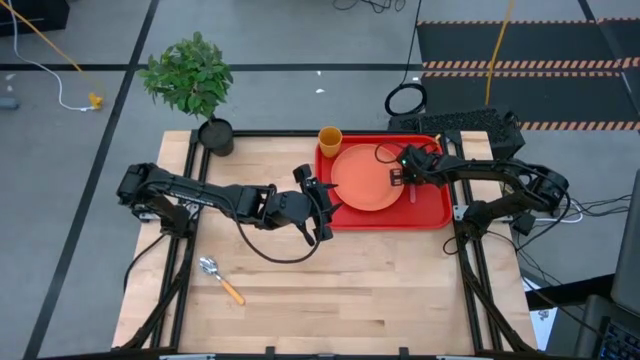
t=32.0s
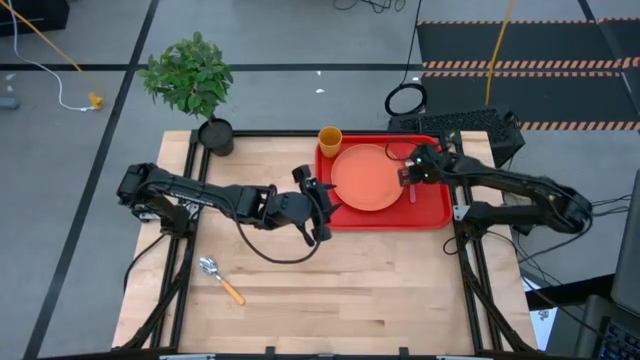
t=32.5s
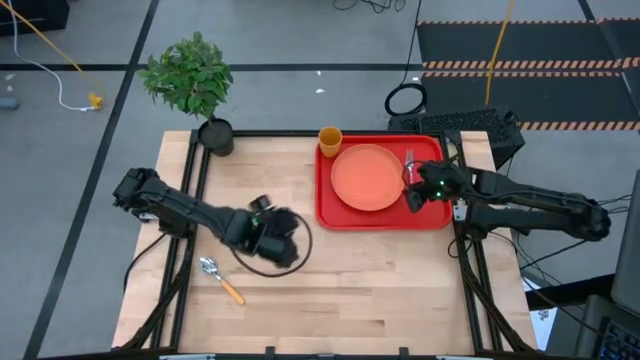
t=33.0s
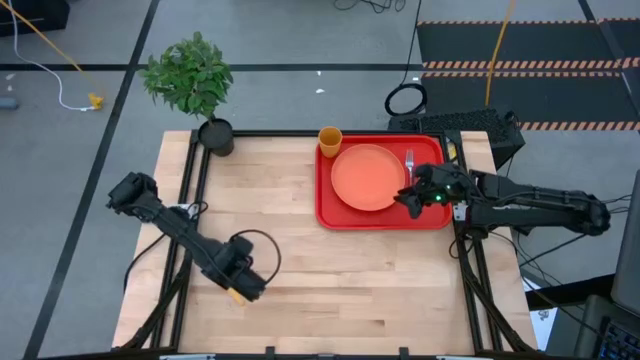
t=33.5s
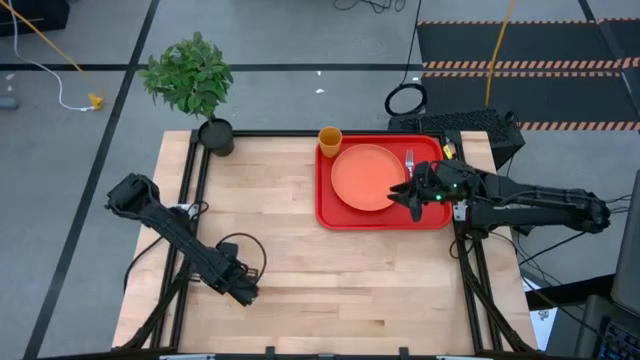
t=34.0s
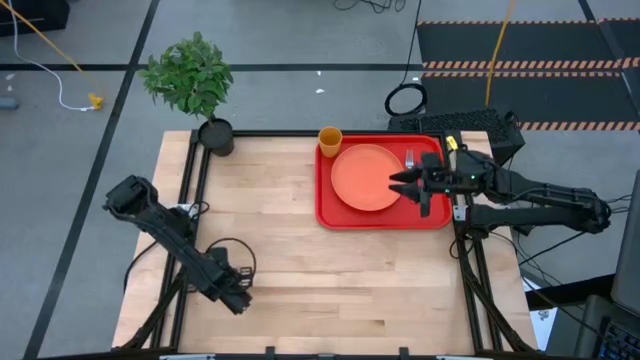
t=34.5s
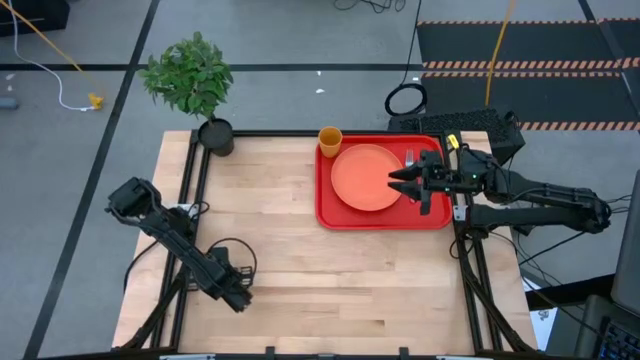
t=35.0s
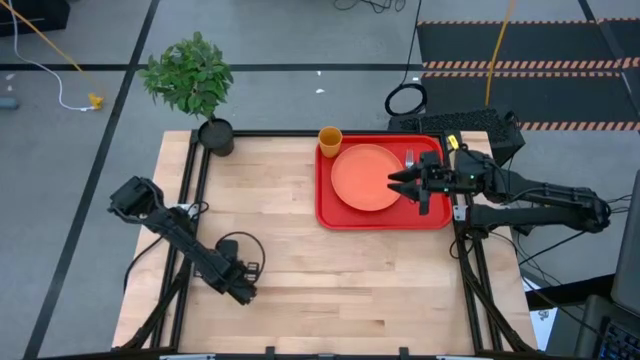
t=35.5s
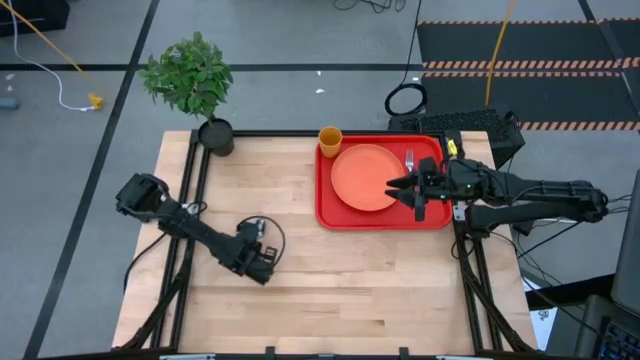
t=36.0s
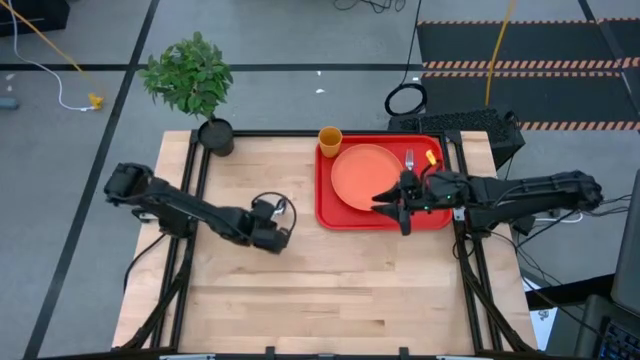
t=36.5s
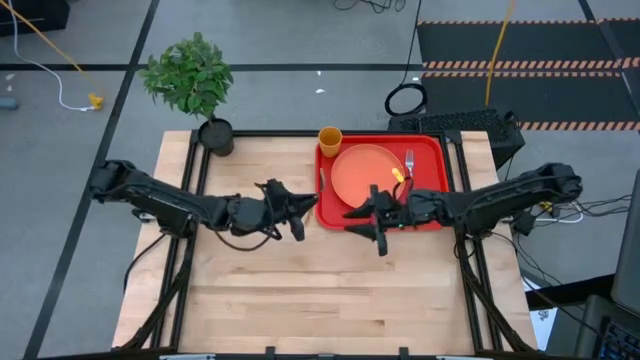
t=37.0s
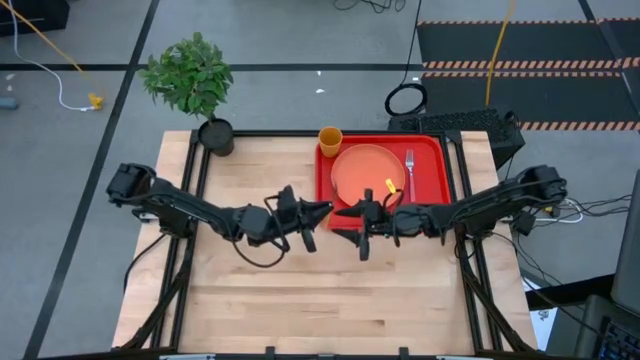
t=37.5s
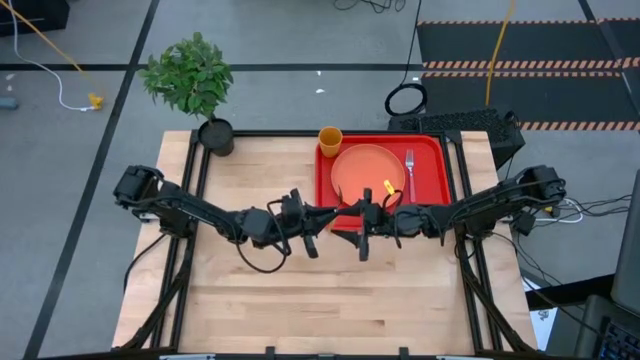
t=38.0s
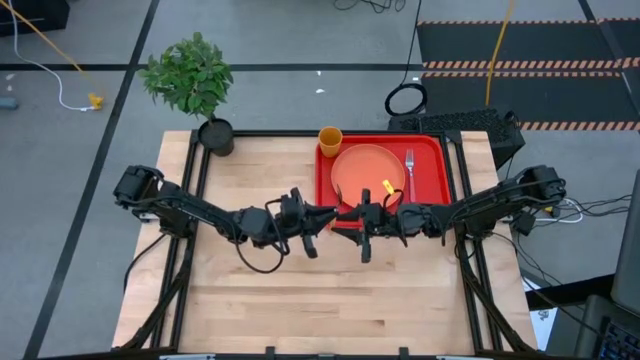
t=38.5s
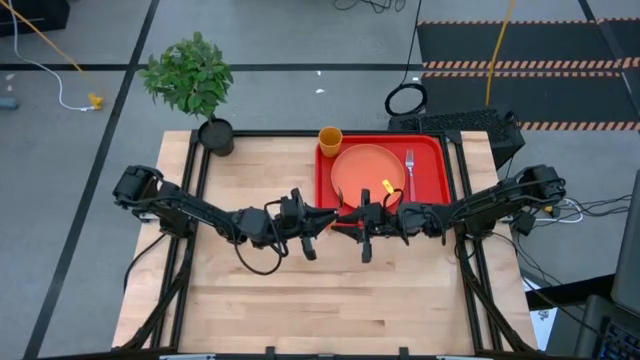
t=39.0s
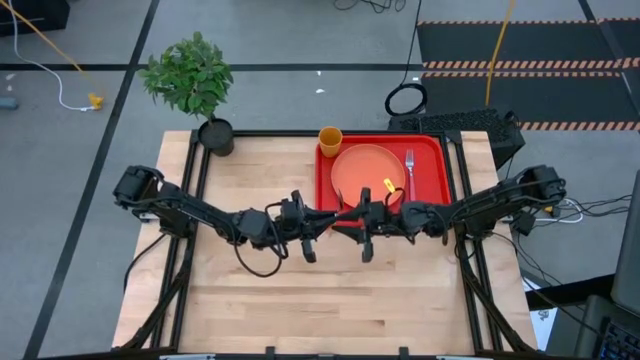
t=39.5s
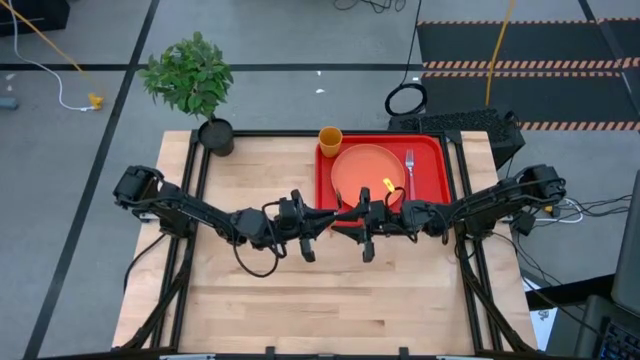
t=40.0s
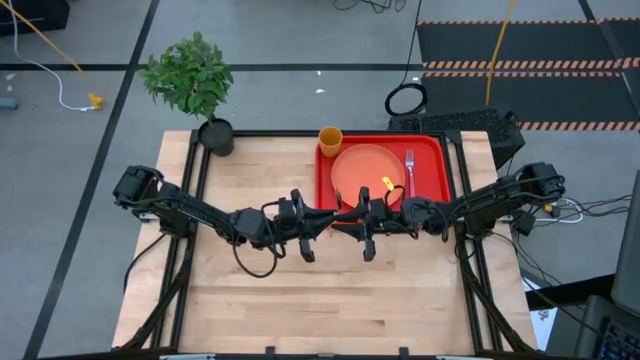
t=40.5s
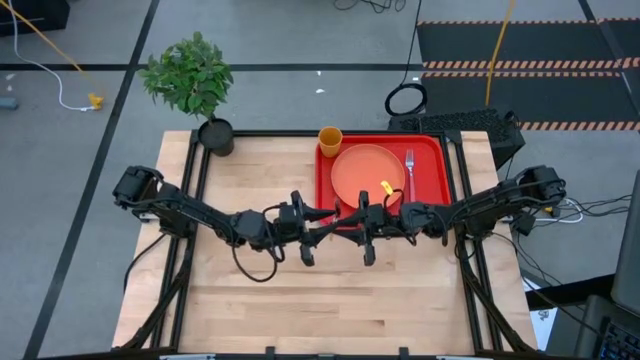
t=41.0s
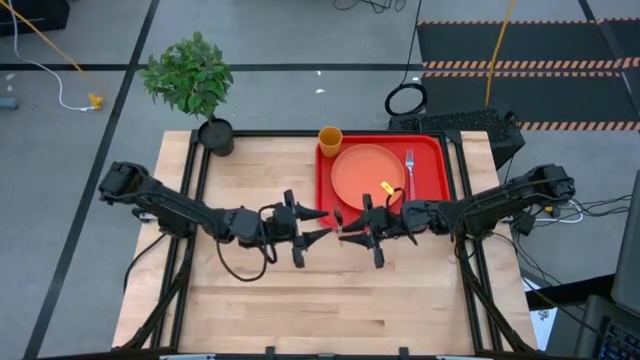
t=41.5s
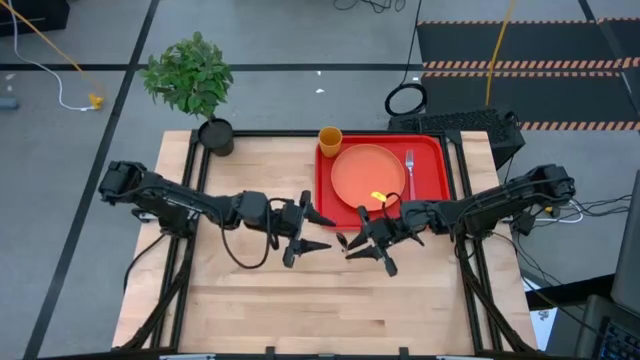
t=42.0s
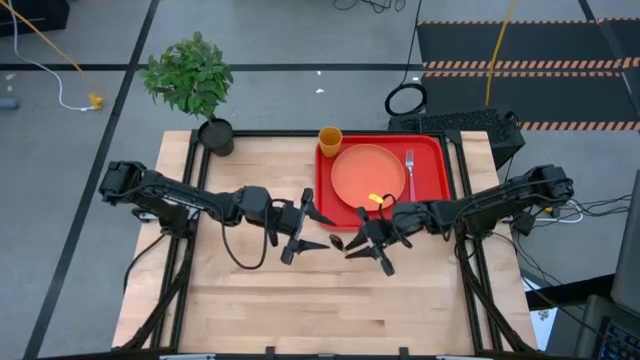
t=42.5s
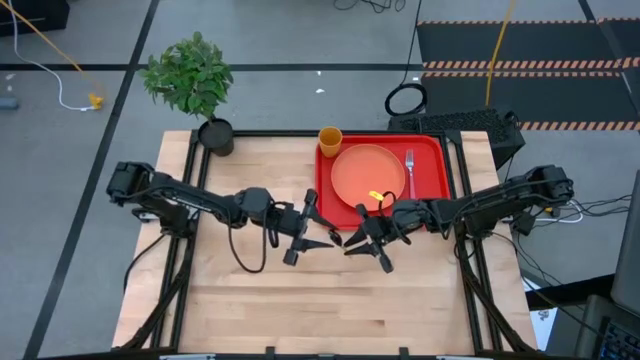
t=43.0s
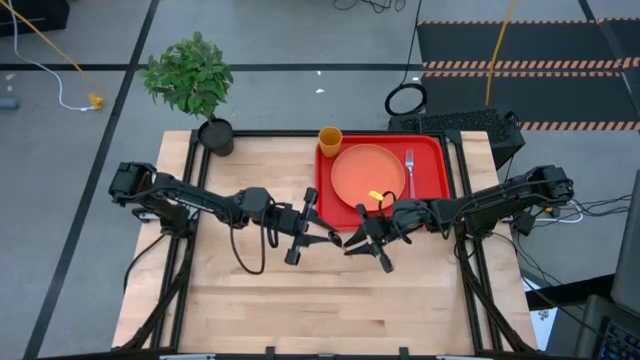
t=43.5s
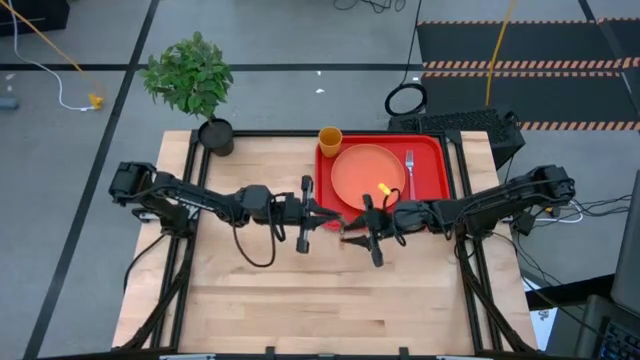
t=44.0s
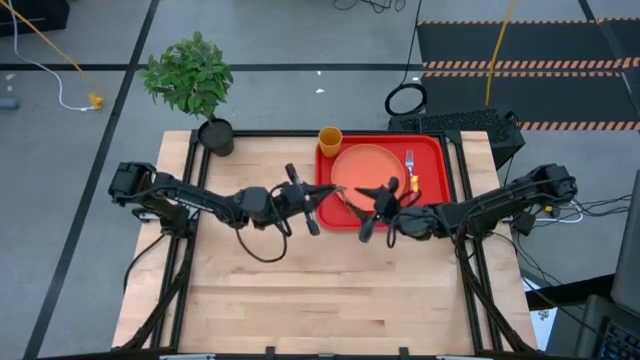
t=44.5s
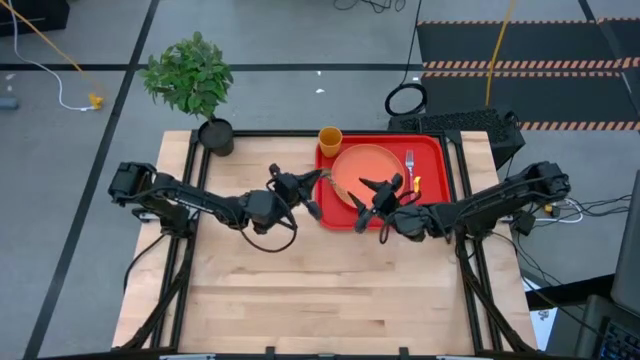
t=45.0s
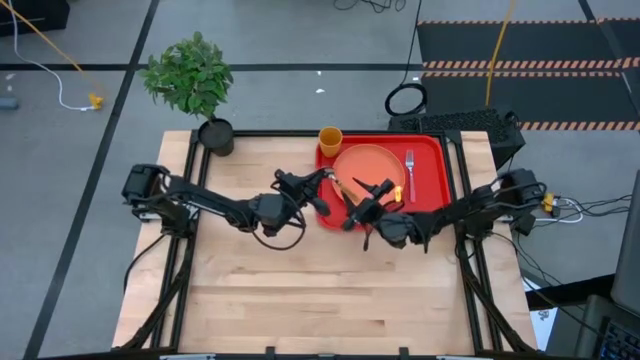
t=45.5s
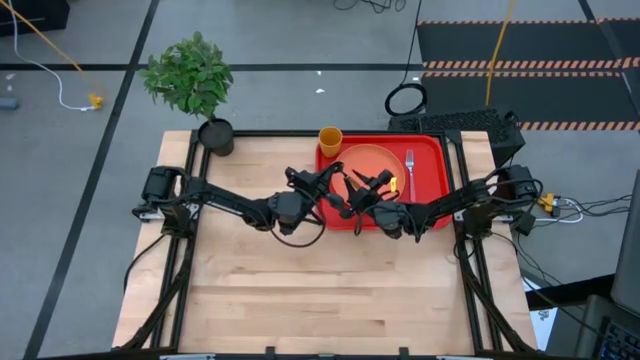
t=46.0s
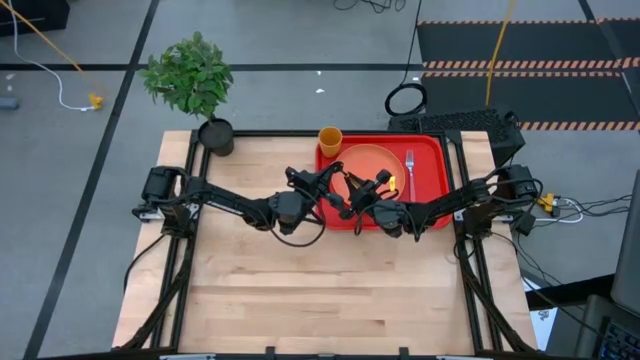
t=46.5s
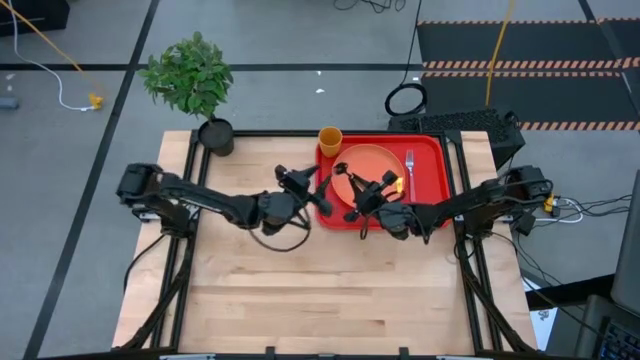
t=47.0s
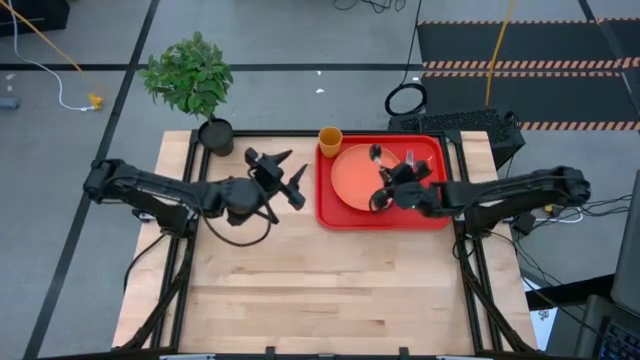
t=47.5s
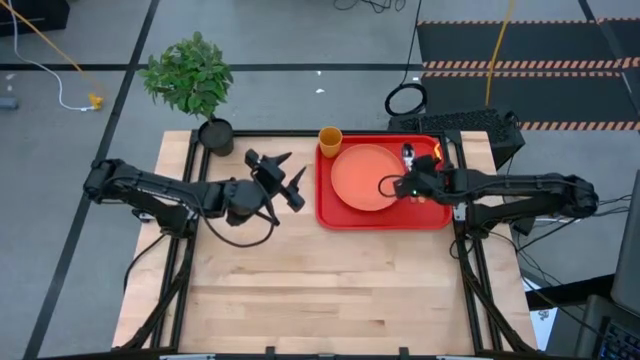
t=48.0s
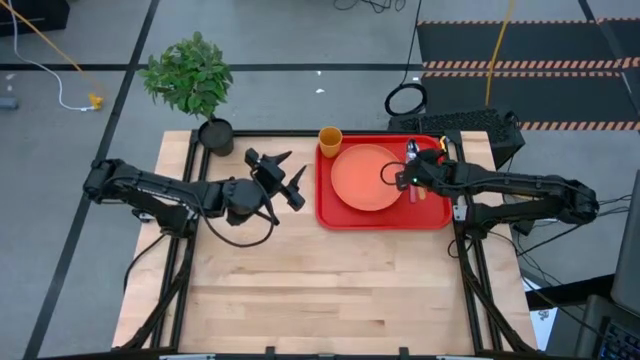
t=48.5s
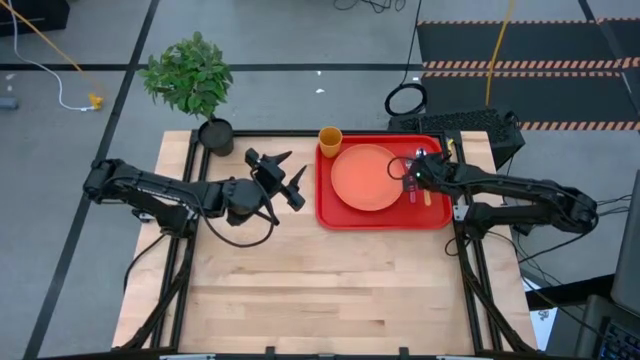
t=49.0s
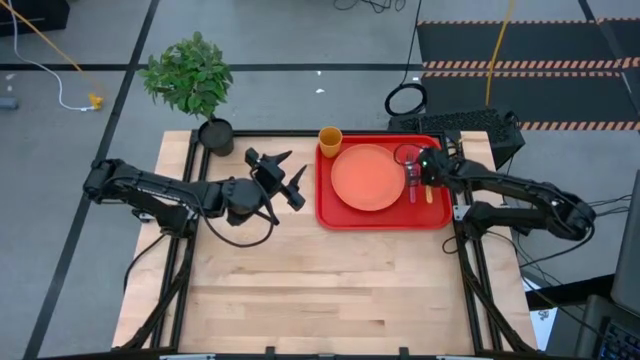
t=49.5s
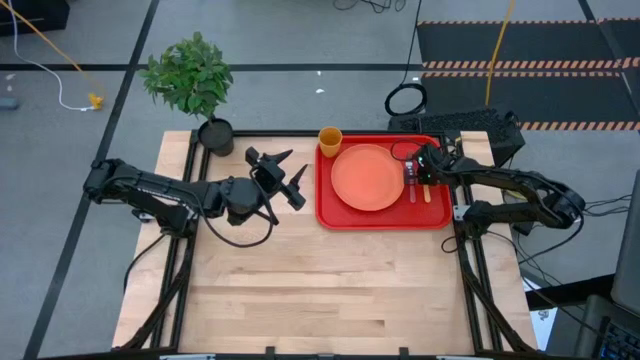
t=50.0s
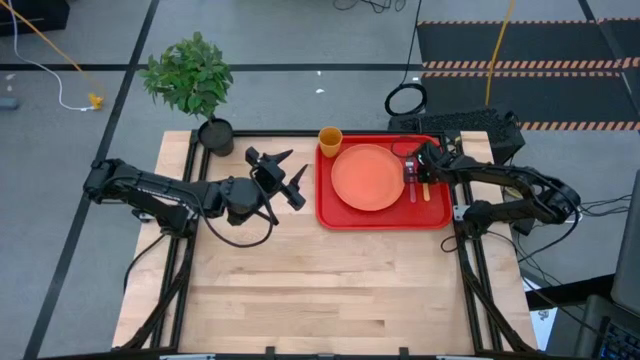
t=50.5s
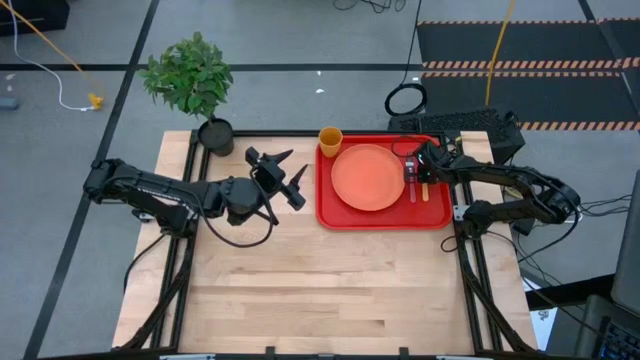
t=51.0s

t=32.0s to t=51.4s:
Task: Pick and place plate/cup/fork/spoon on tray
Put the yellow spoon to the right of the pink fork on the red tray

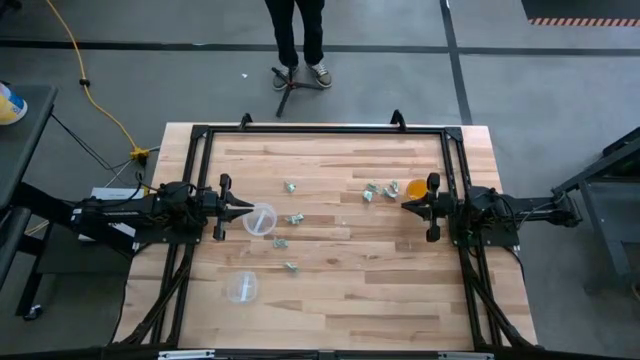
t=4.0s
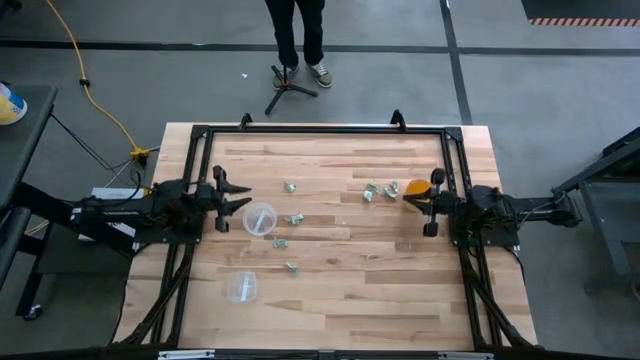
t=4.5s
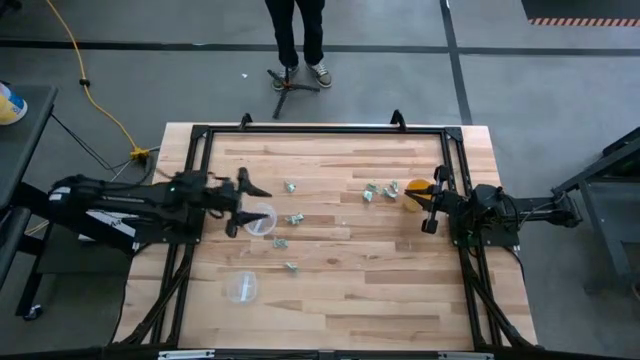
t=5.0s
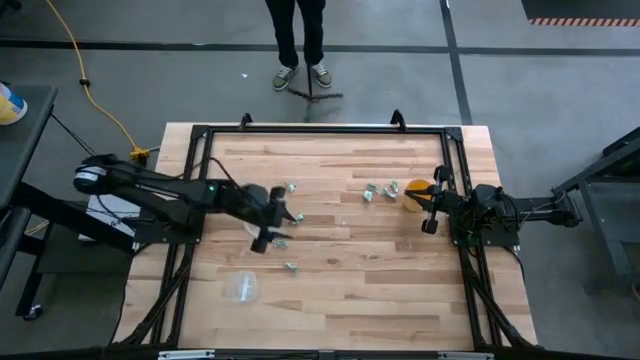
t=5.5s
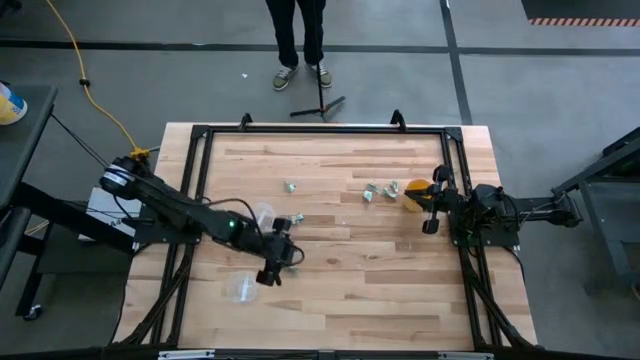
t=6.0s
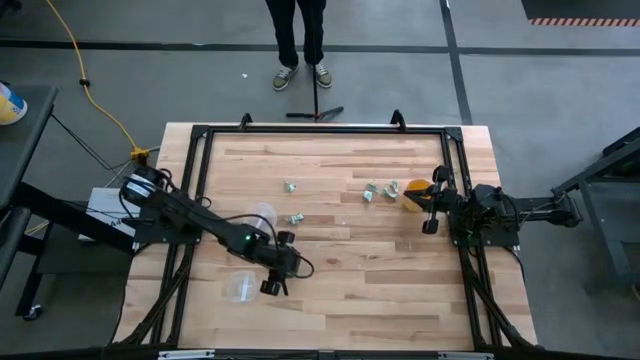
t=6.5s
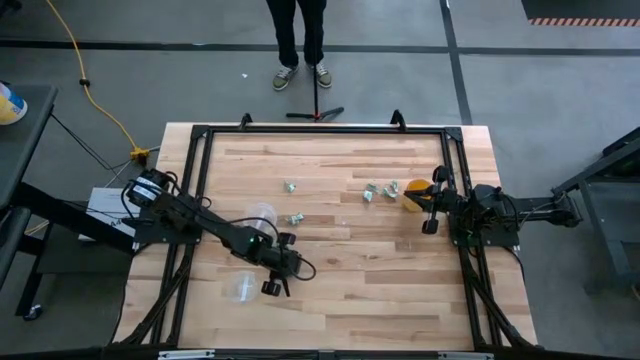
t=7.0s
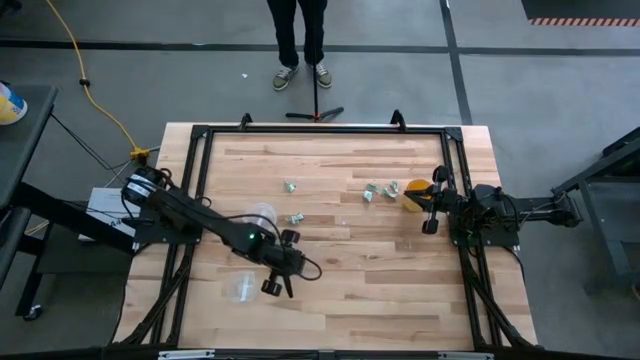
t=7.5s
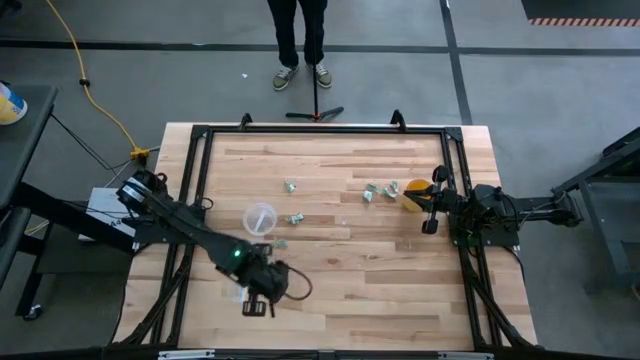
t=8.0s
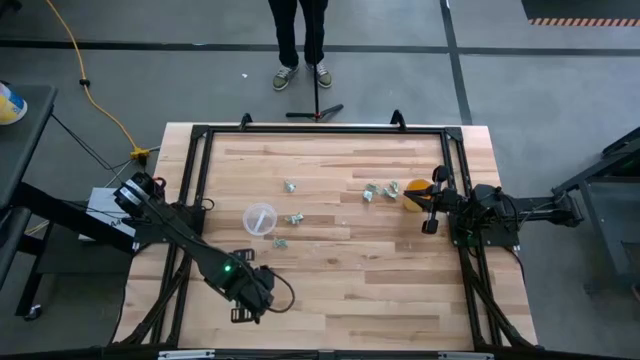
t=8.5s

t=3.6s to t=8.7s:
Task: Pick and place Stevia / Truvia into bins
Put the stevia packet in the bottom transparent container
